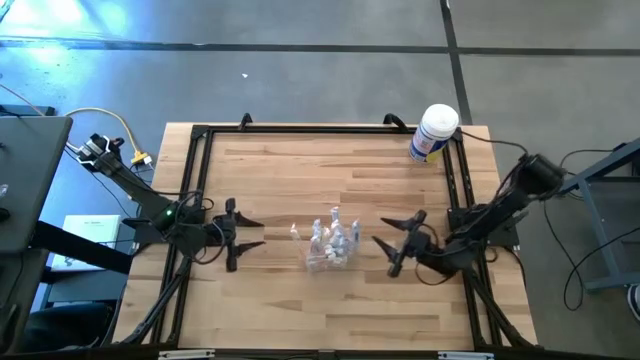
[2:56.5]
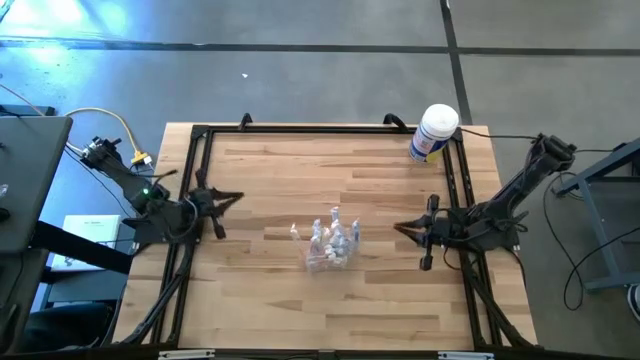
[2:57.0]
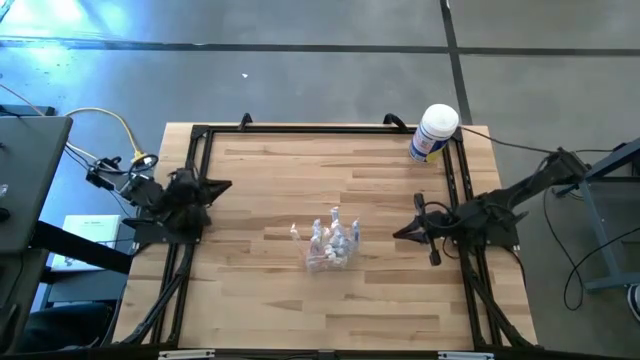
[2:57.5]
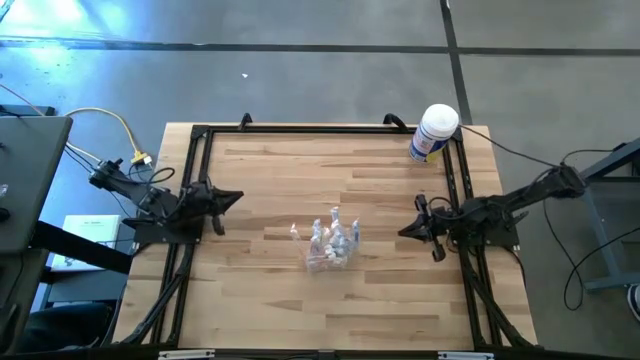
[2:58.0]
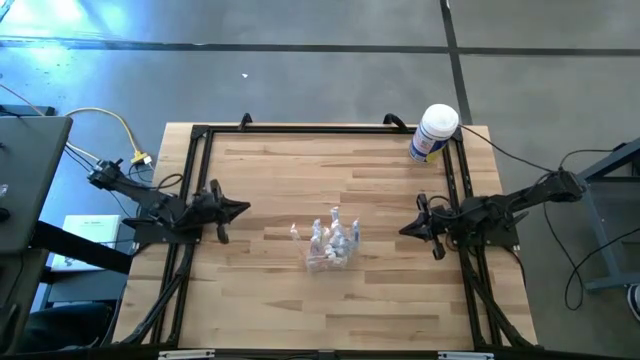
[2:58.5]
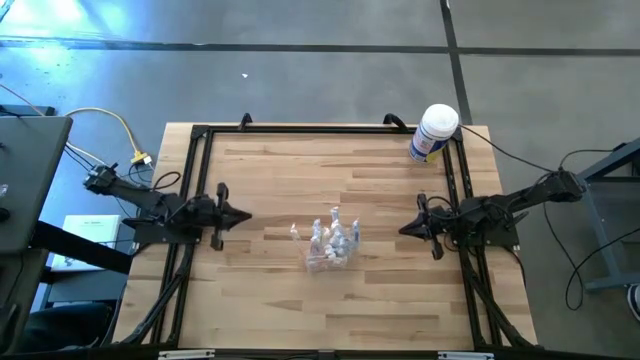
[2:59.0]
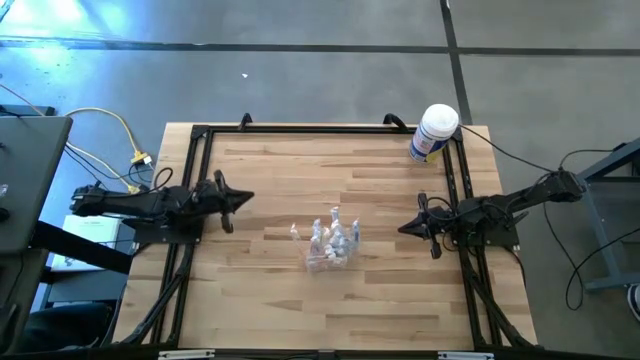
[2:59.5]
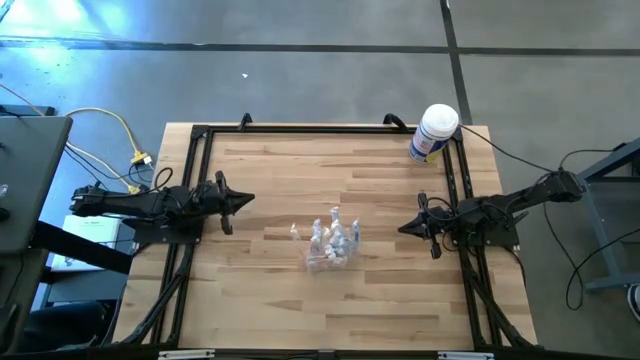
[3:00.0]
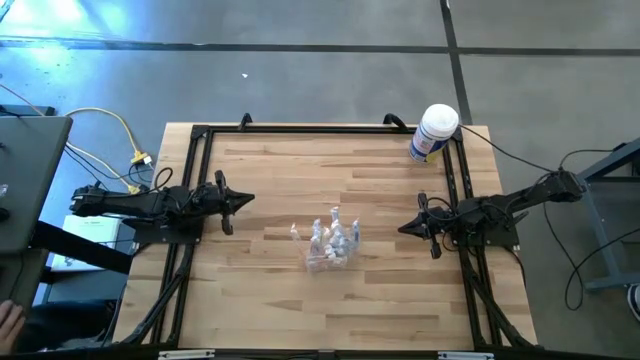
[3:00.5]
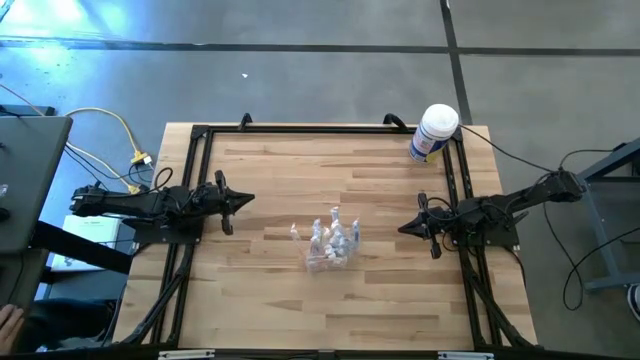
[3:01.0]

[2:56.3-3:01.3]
Task: Pick & Place toothbrushing station
Return to Home Position

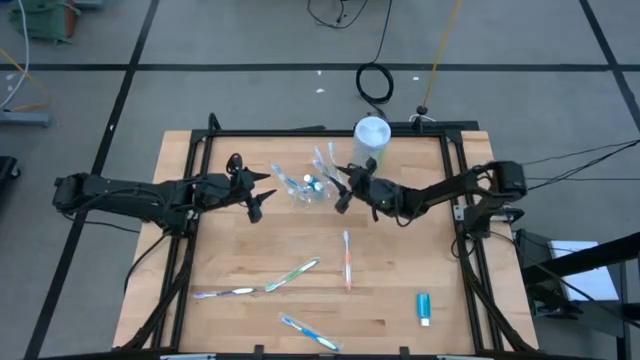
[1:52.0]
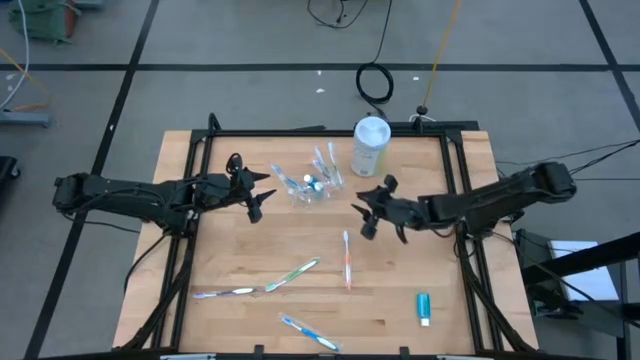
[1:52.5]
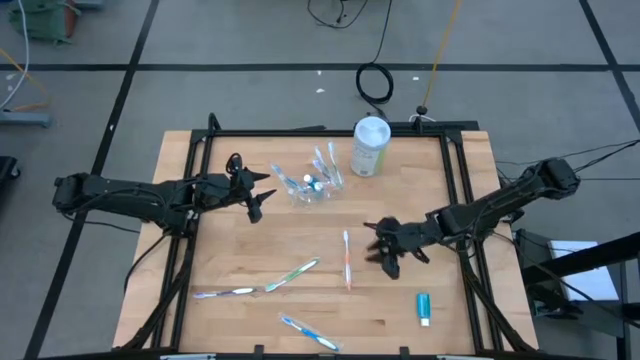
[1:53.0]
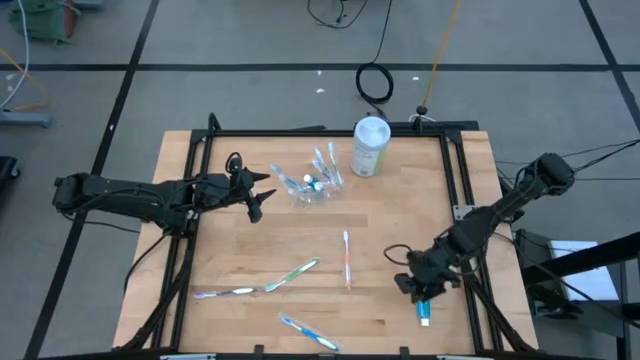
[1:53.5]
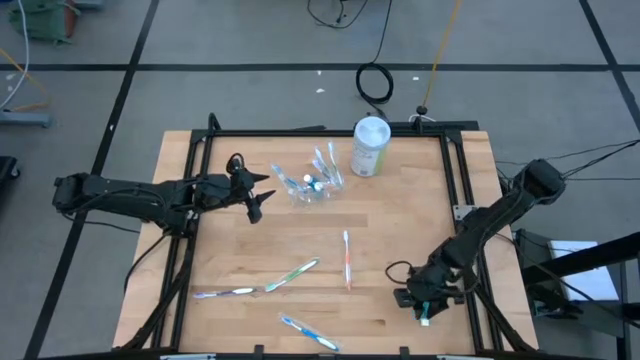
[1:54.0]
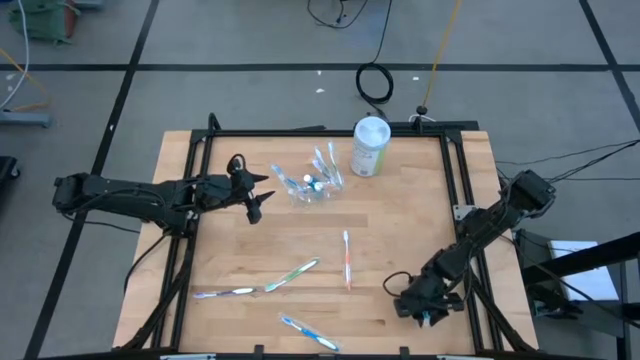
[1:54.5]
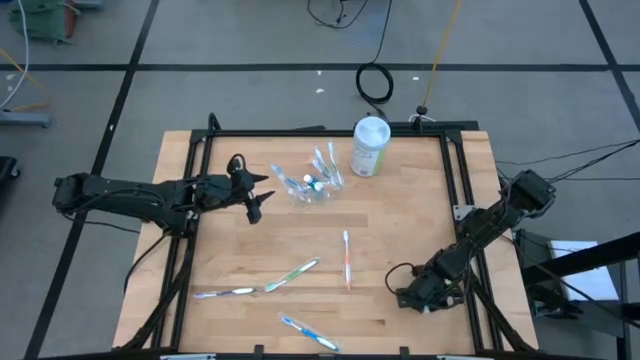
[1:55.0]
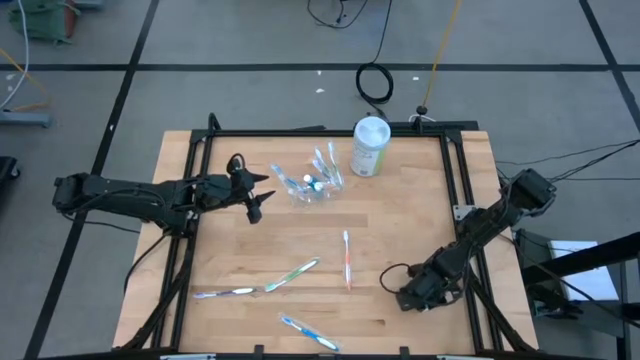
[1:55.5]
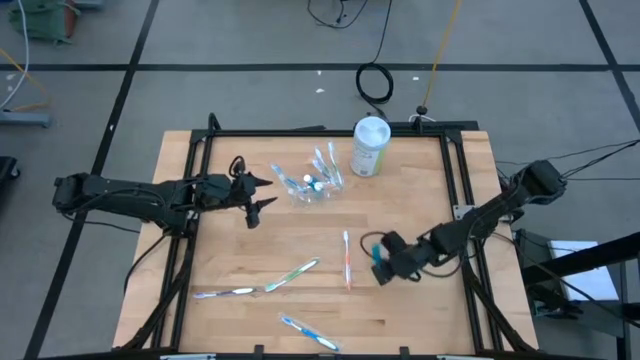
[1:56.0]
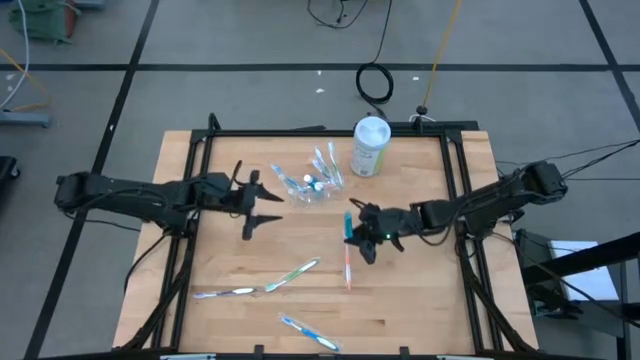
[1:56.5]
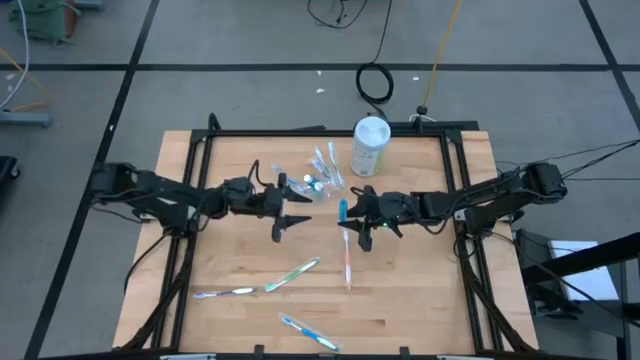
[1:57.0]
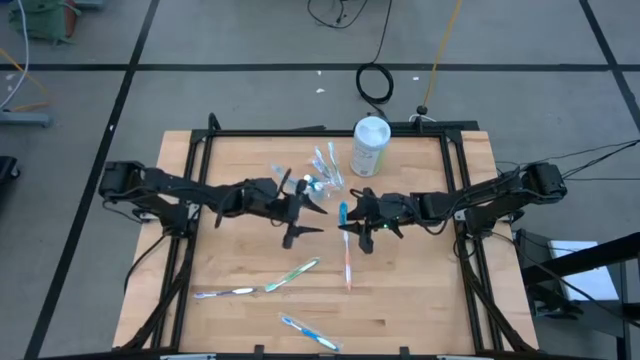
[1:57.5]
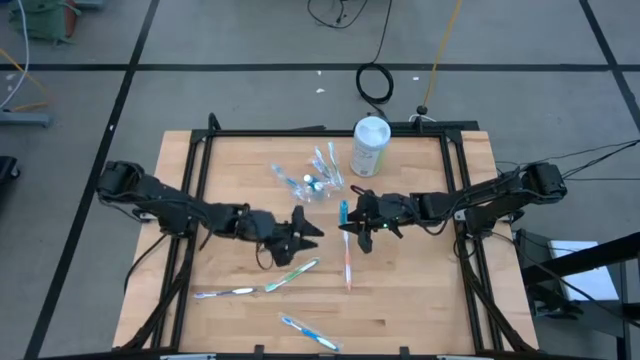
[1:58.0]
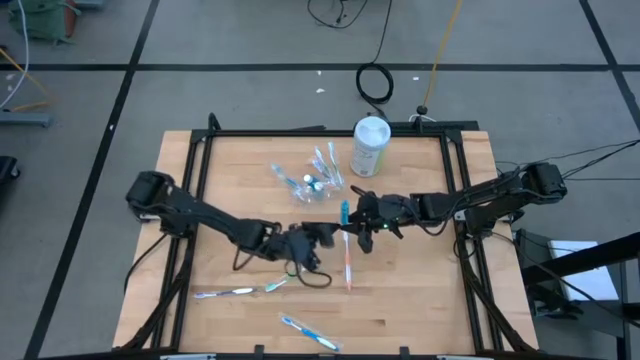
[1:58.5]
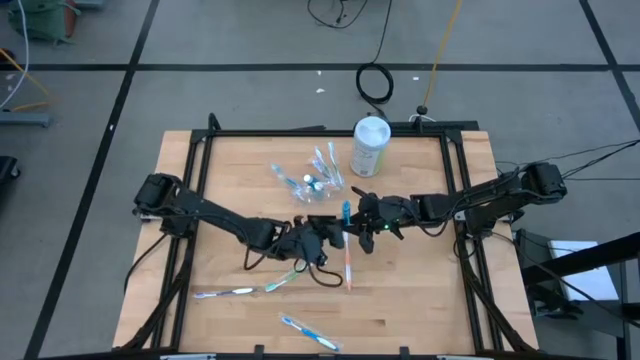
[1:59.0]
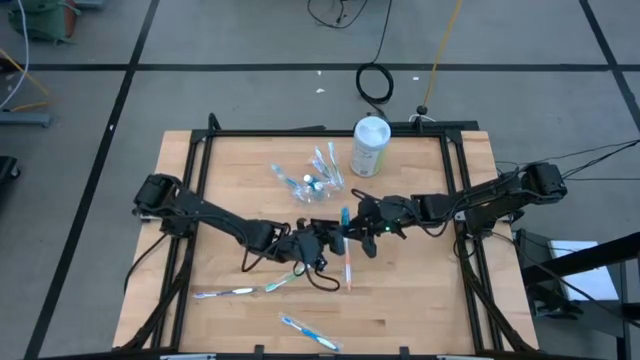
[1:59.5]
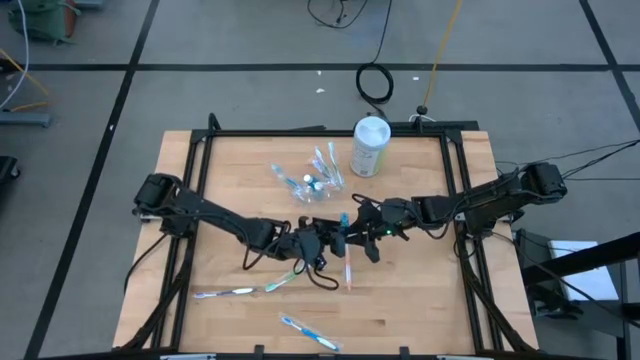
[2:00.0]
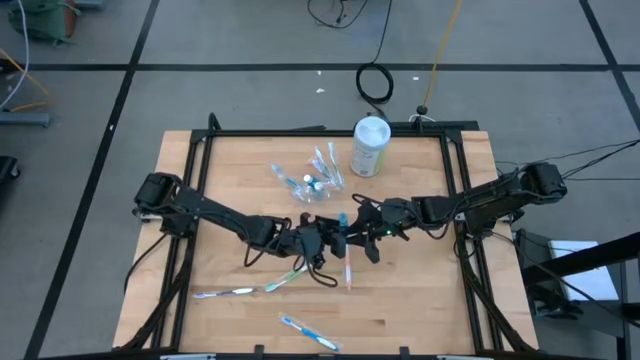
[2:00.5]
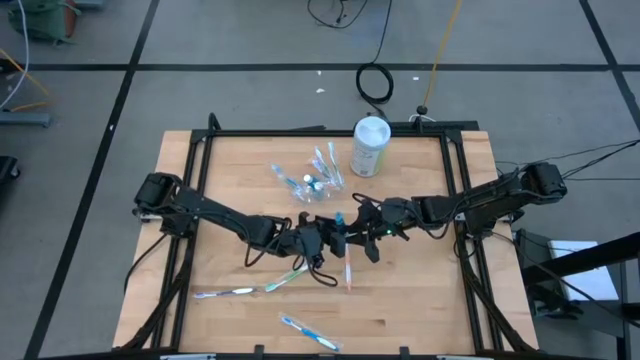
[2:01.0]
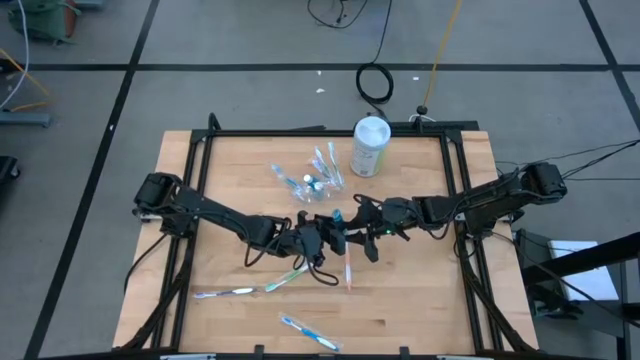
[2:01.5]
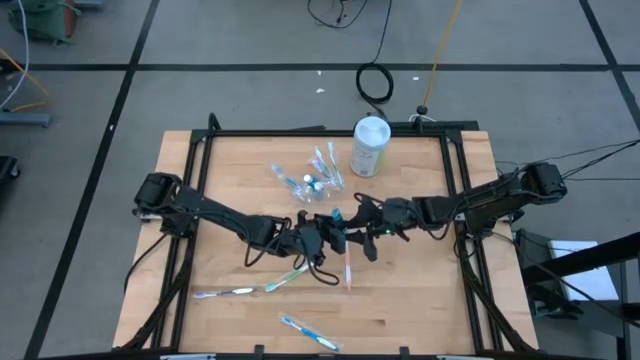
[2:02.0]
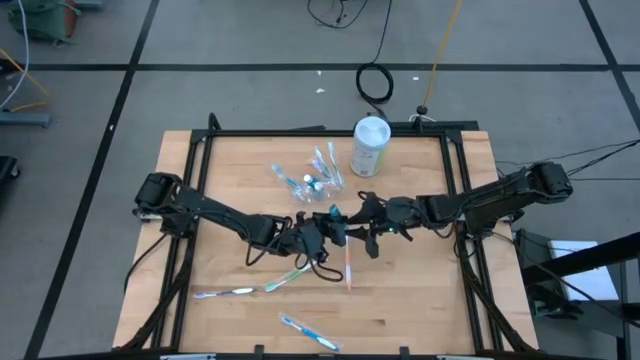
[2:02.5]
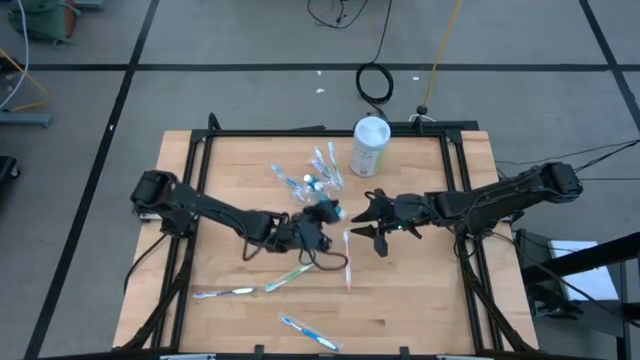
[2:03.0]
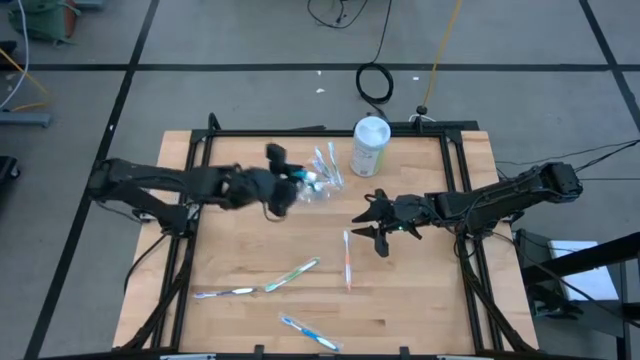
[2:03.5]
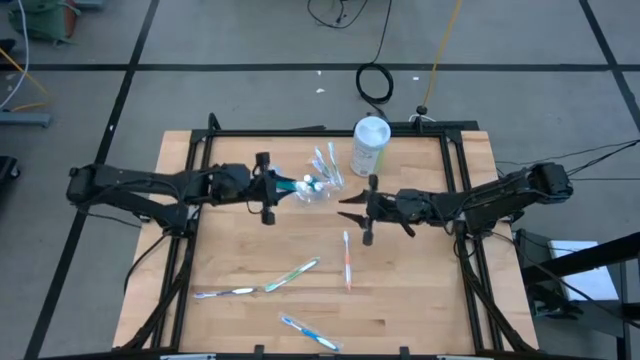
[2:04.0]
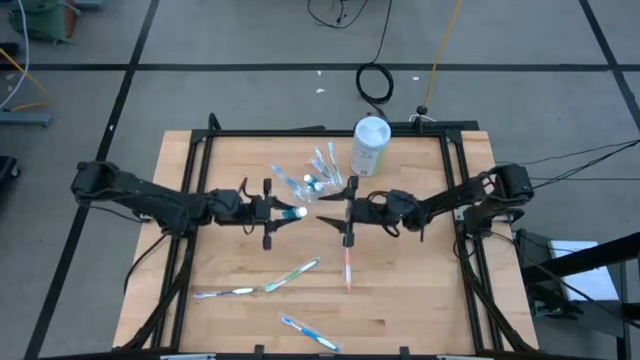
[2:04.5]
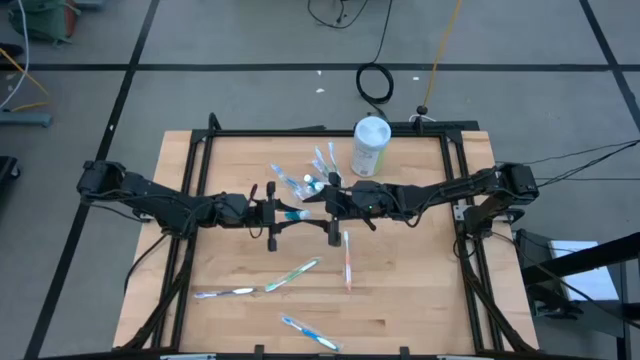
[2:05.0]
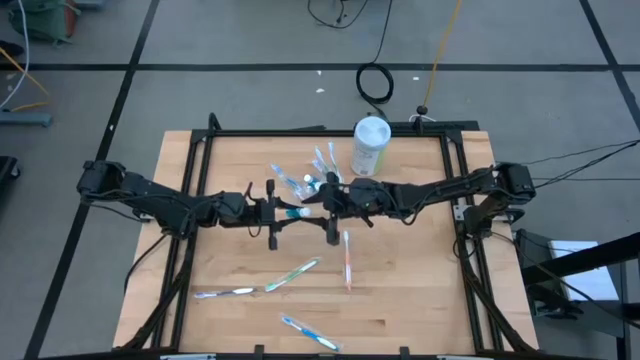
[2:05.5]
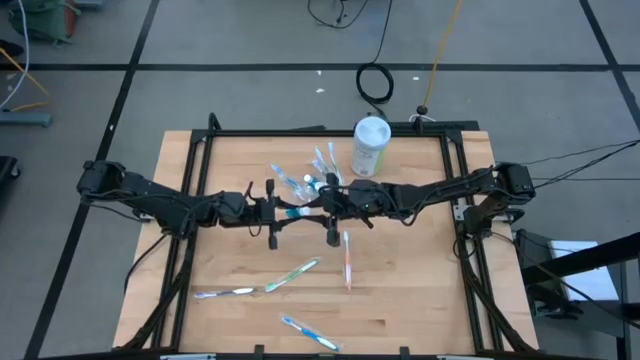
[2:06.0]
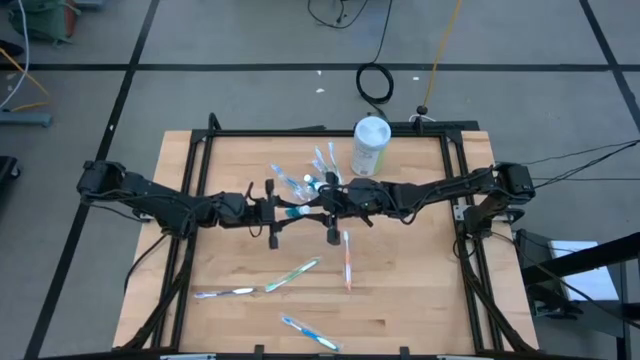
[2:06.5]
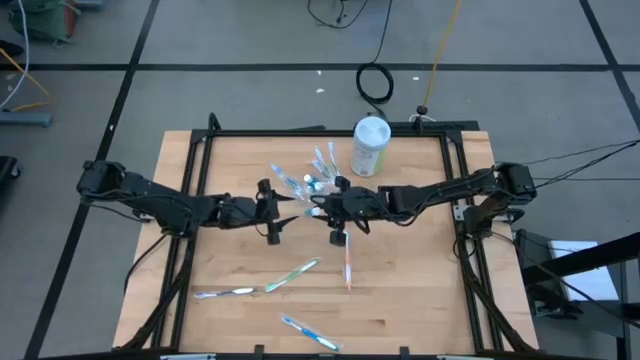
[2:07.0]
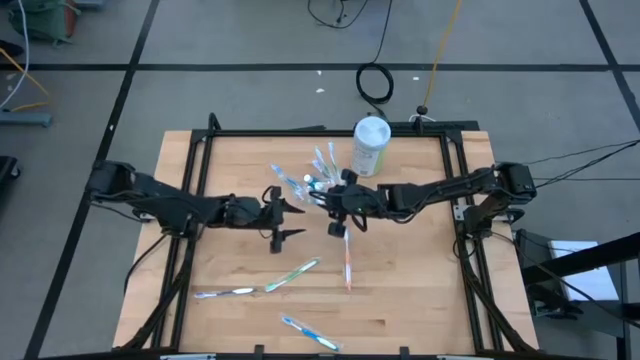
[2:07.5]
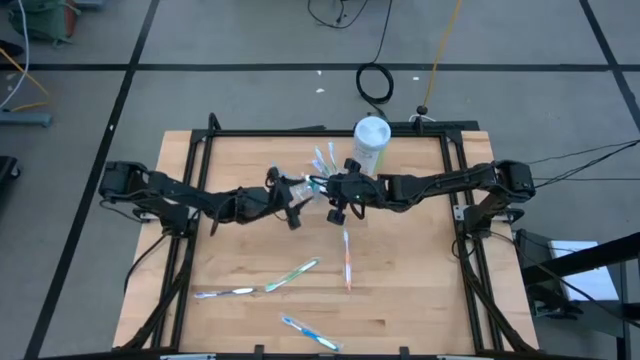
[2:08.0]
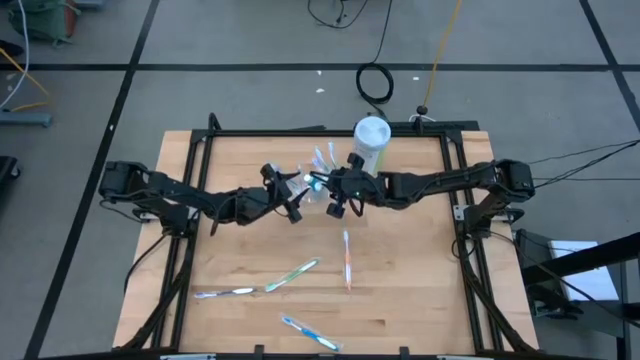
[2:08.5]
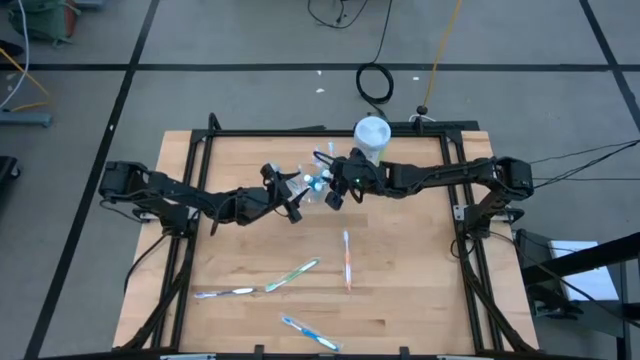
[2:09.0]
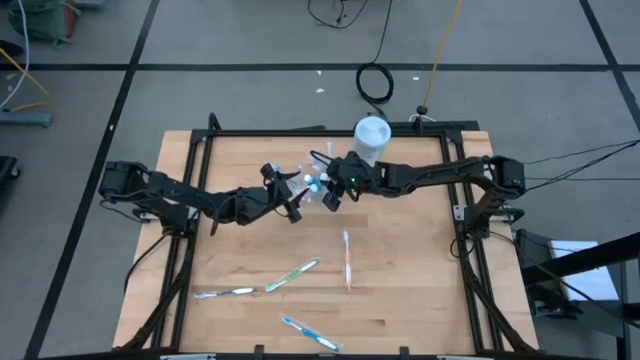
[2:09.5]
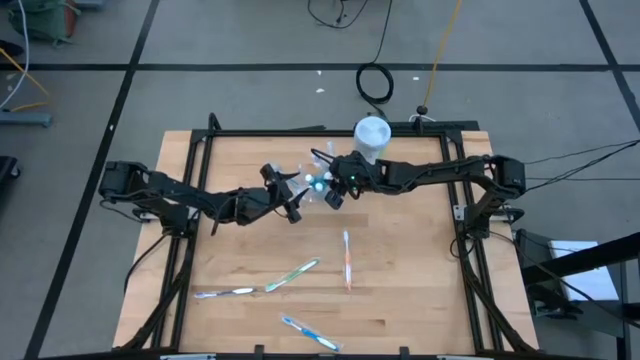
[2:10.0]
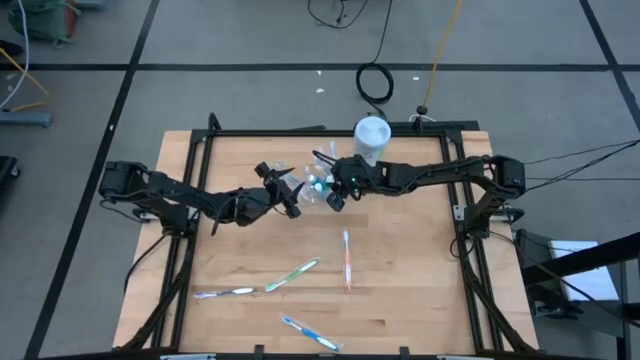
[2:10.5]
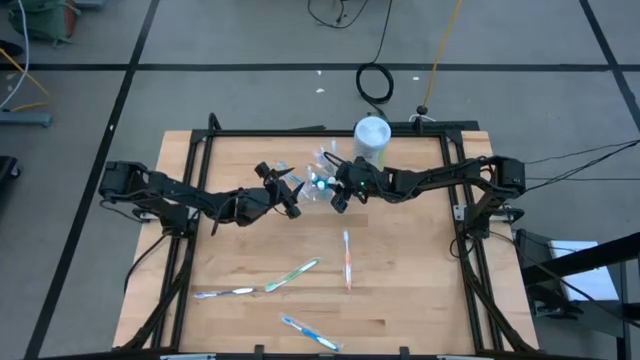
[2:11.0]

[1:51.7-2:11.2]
Task: Pick & Place toothbrushing station
Put the blue mouthwash into the transparent organizer
